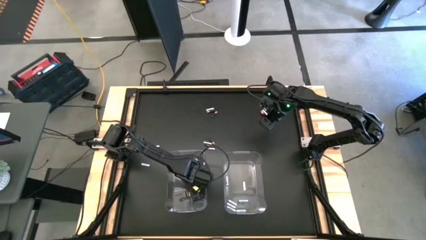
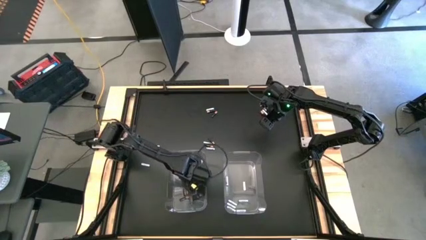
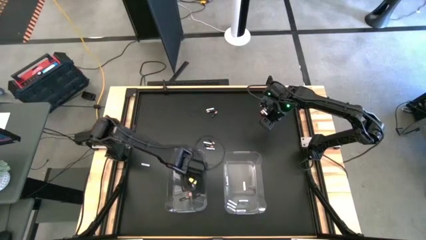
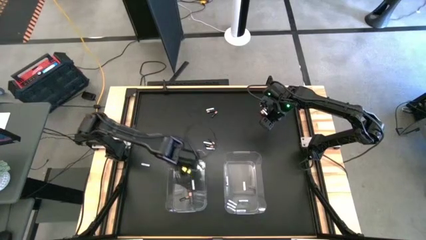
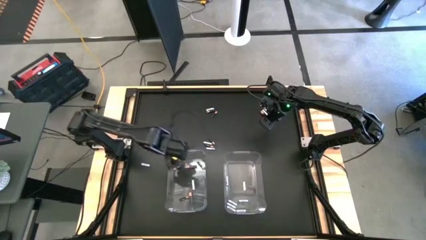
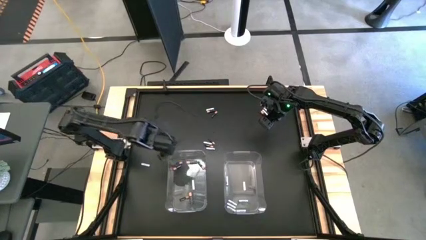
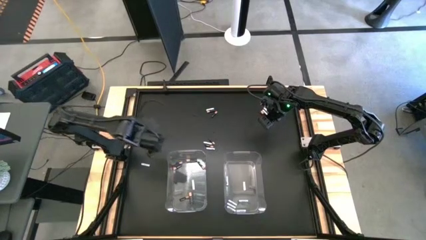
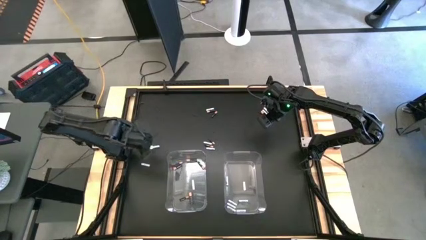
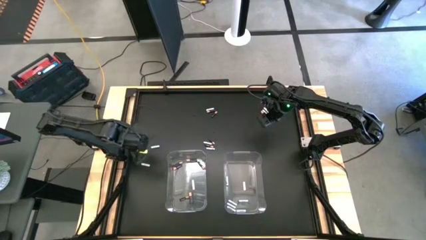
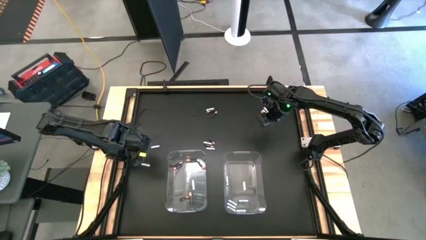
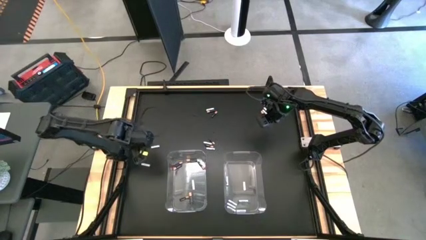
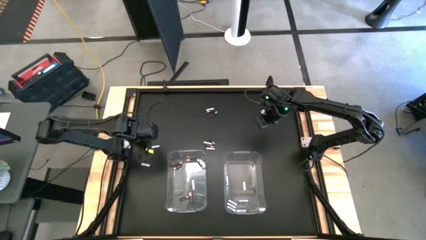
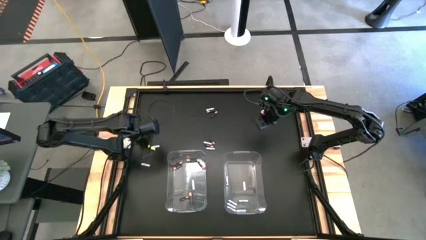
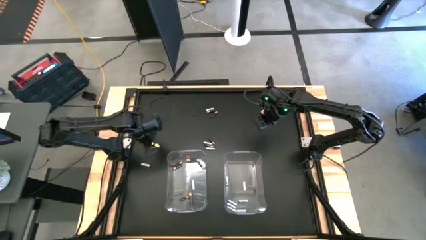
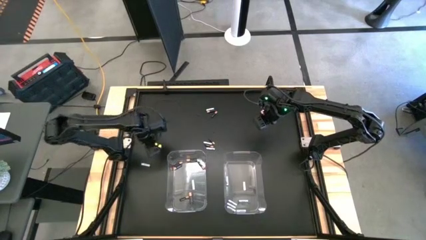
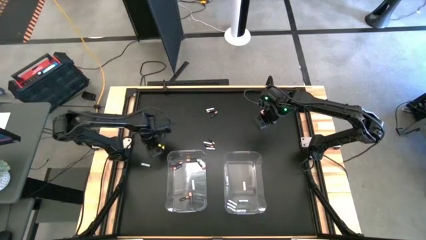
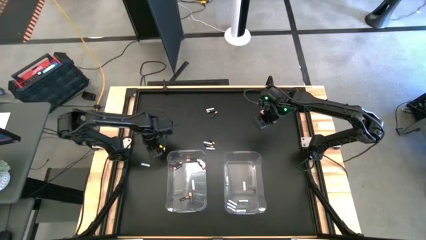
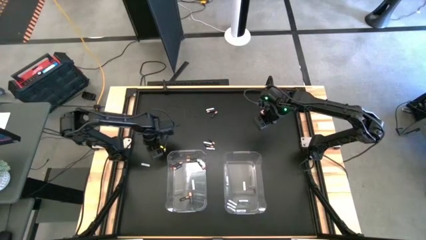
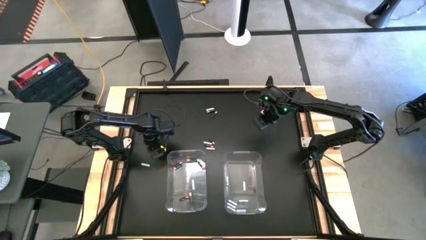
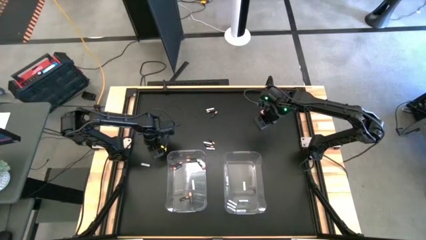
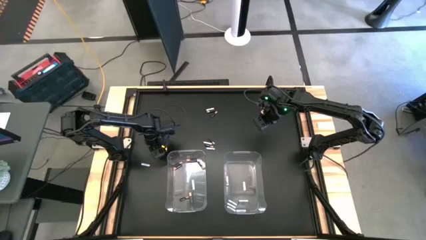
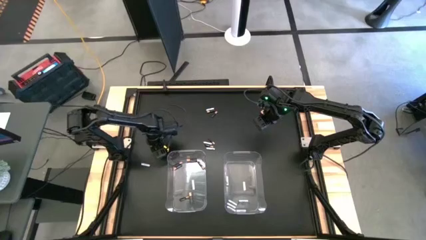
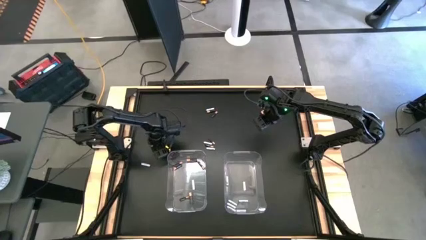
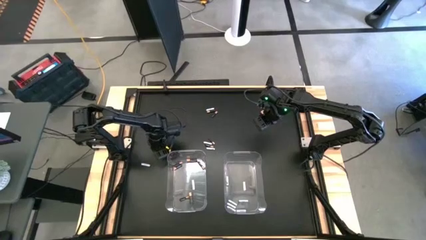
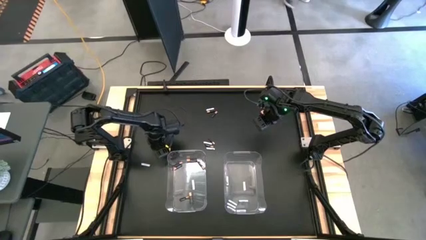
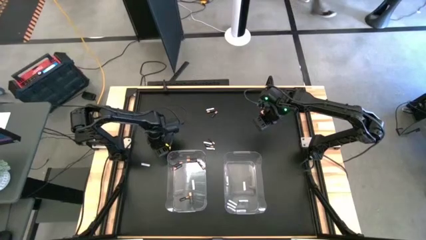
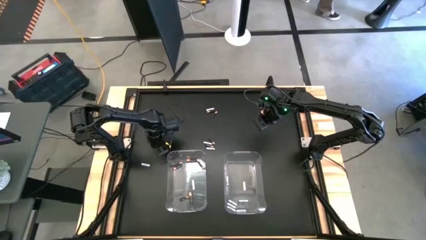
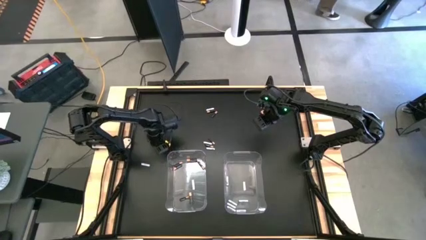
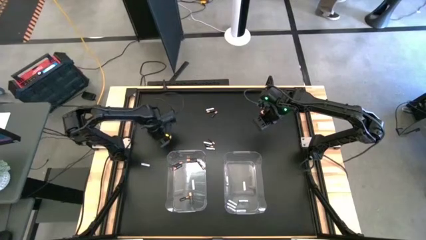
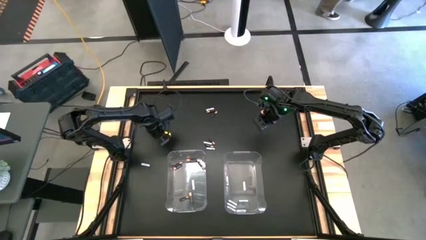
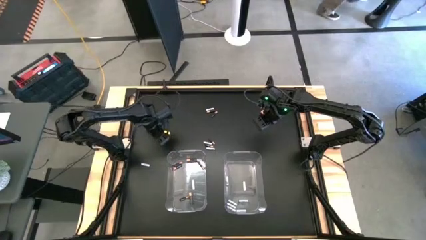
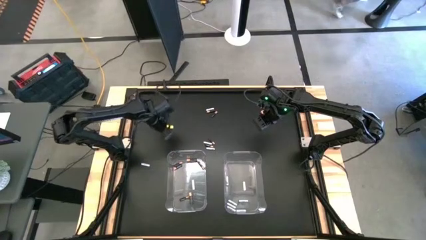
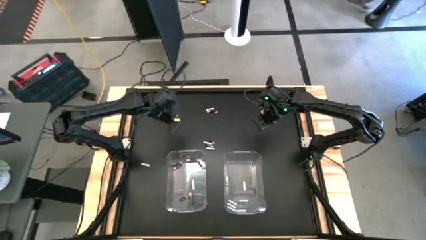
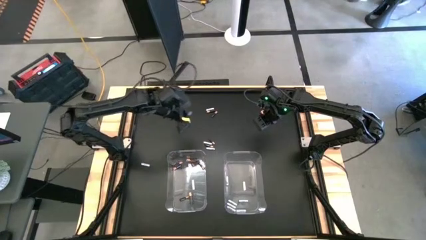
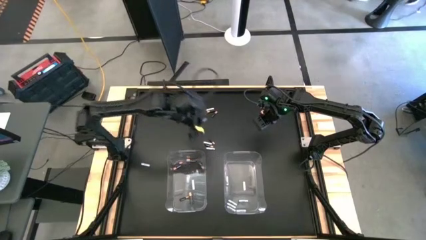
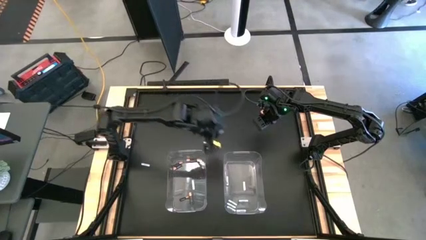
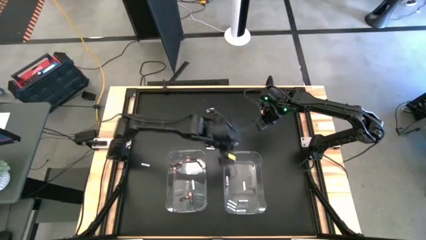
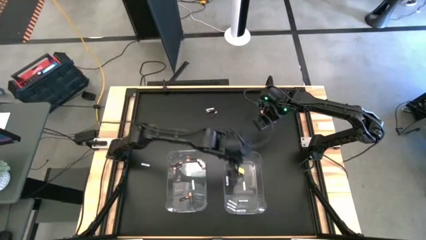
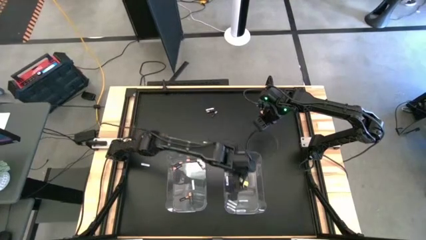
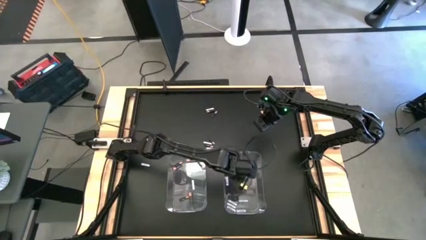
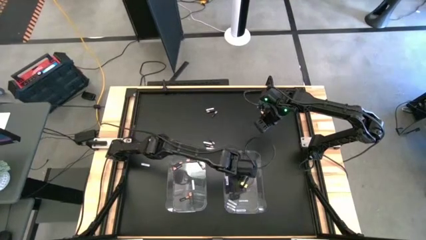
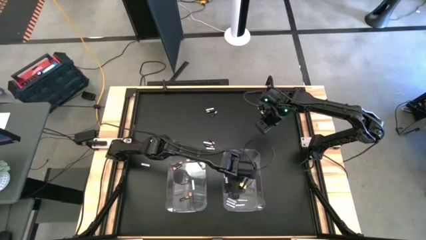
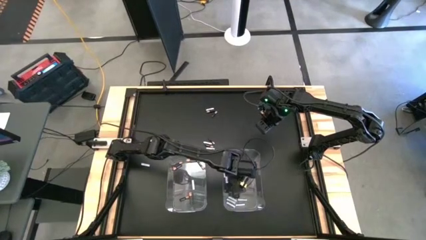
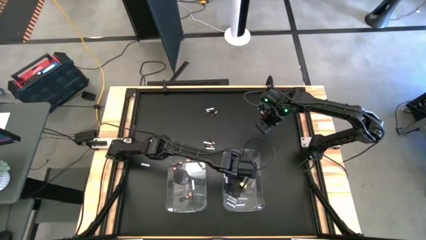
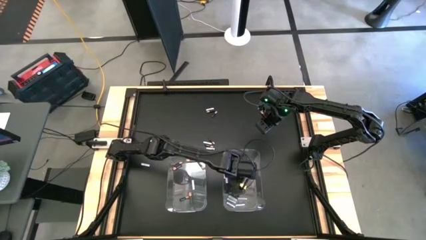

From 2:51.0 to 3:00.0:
Task: Sort batteries
Put the white battery into the right transparent bin

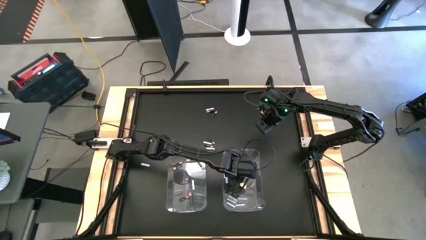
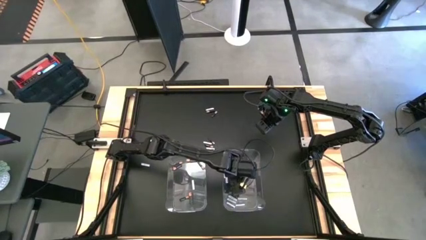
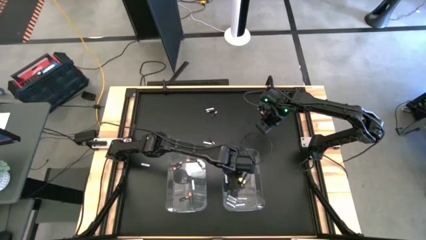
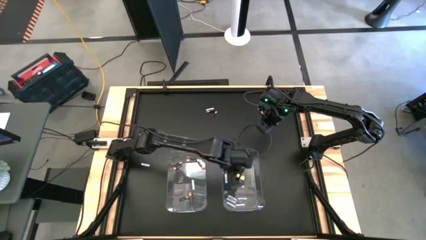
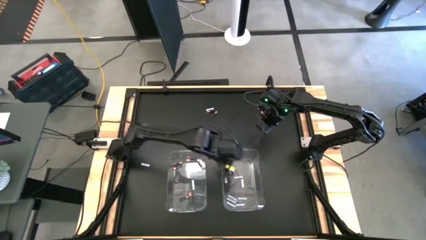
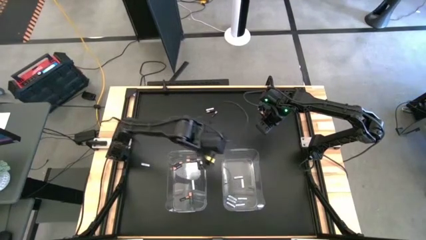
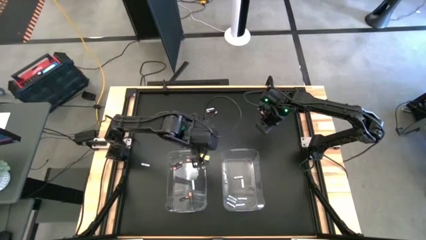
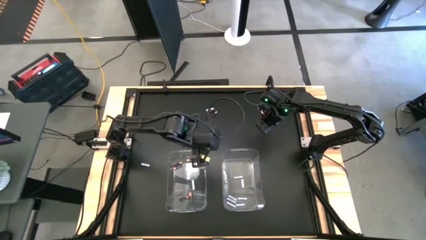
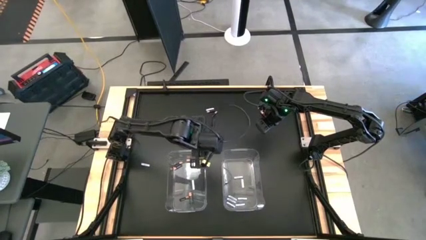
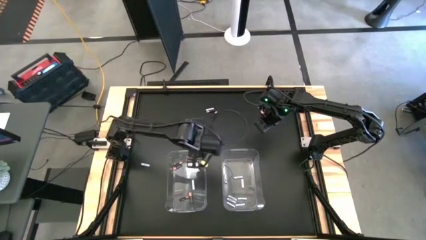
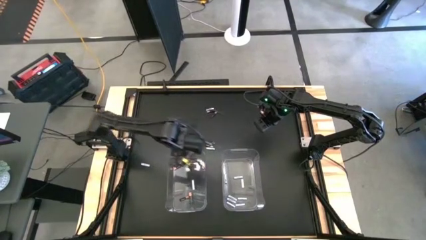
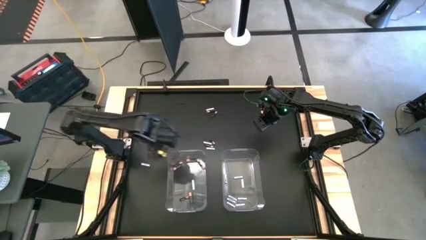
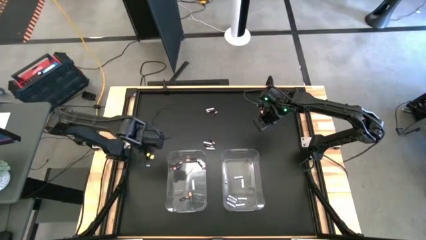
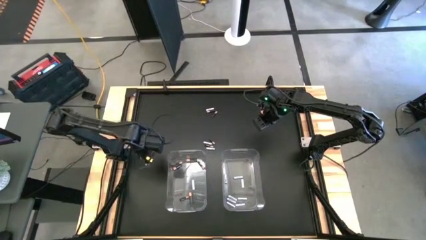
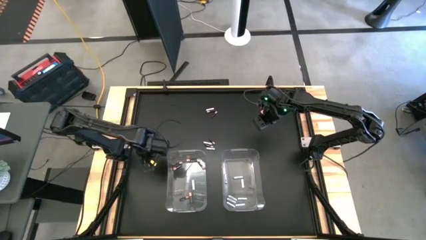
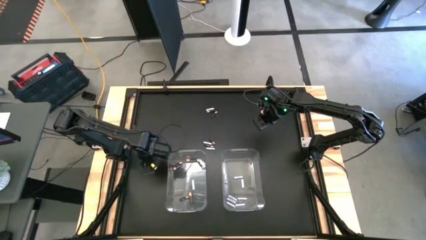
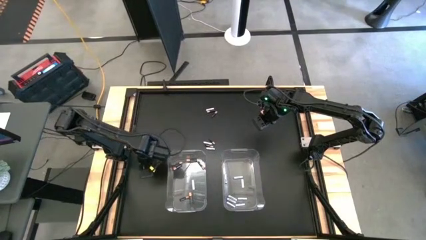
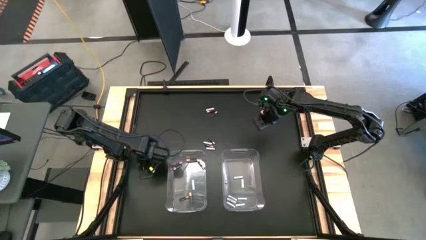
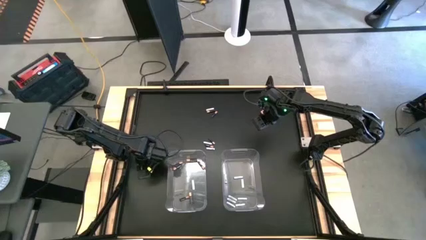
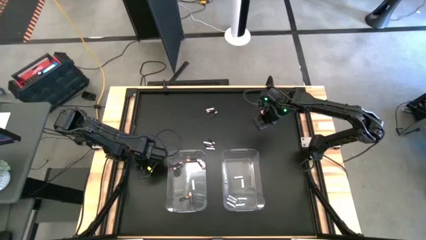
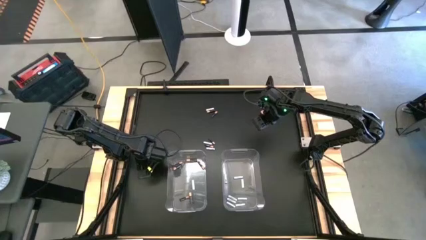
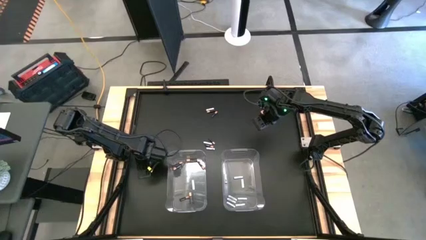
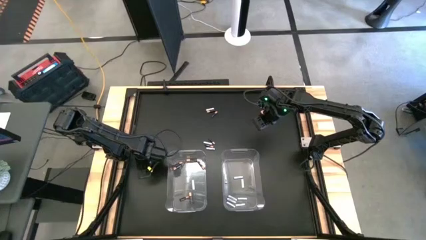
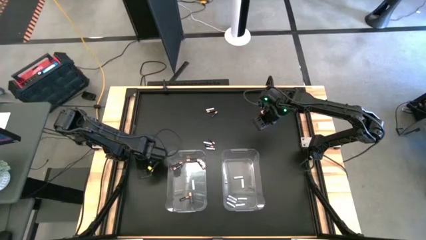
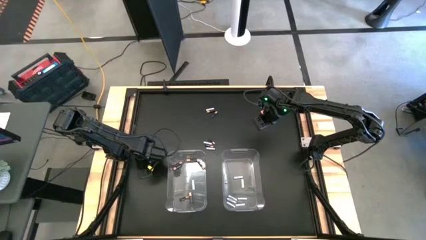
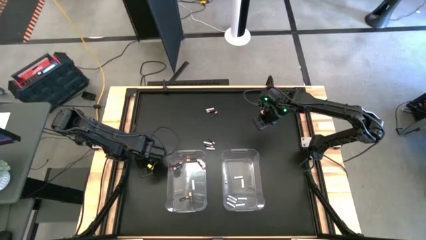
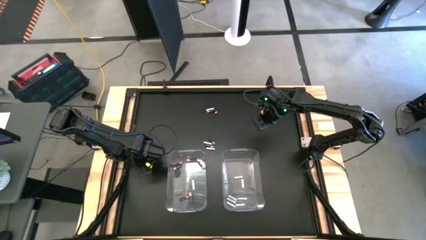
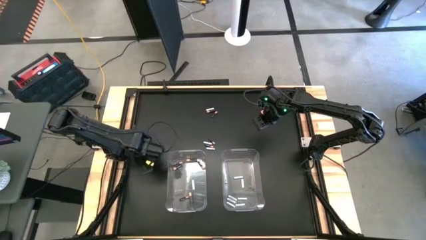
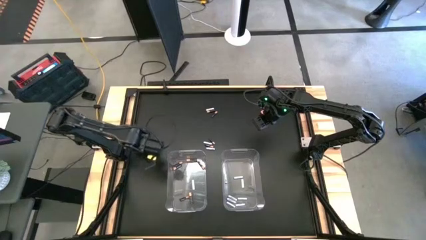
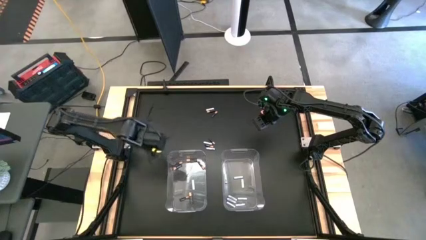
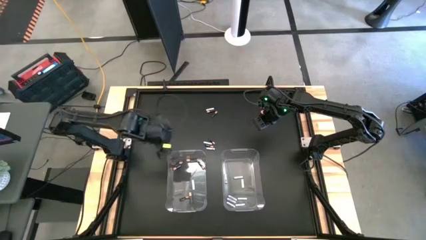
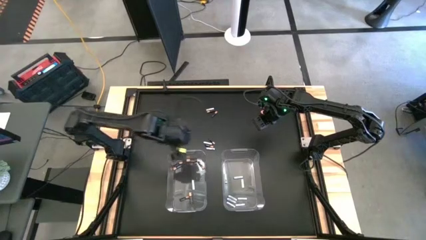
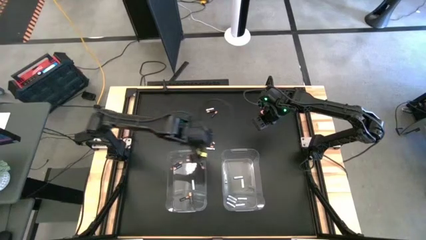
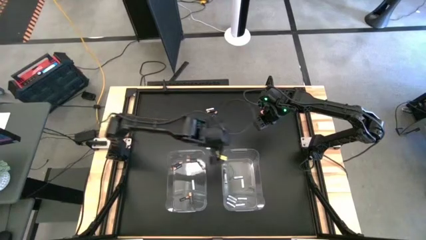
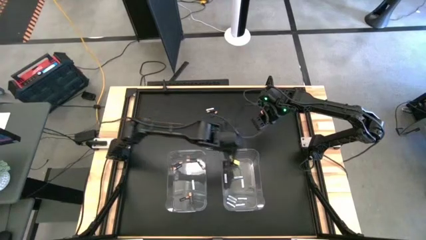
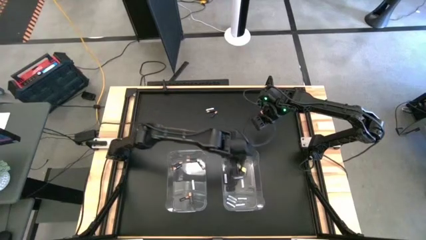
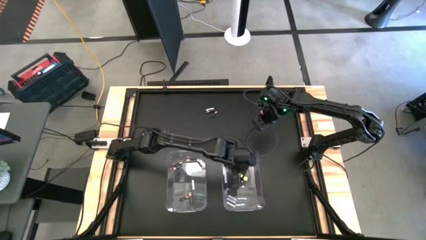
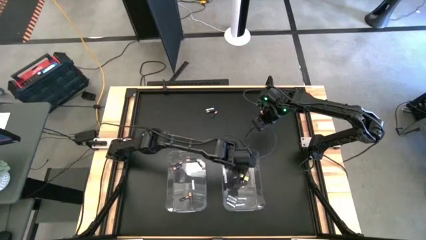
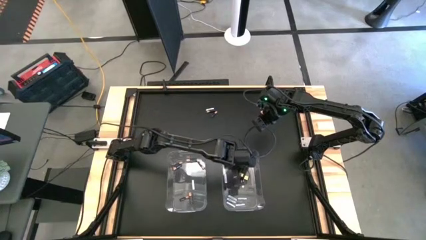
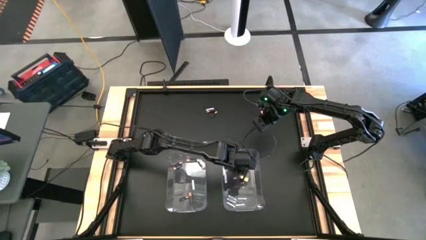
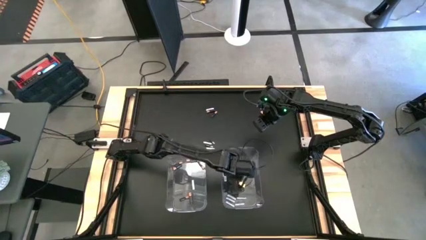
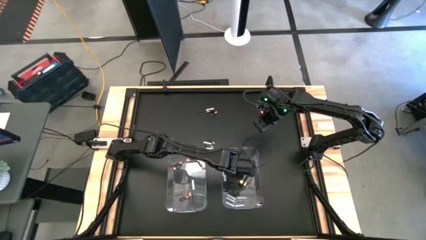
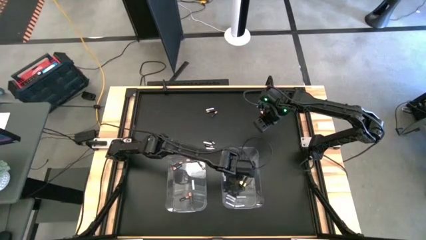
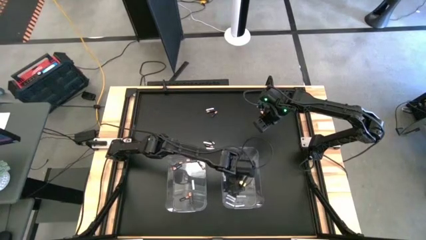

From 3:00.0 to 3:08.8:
Put the white battery into the right transparent bin
